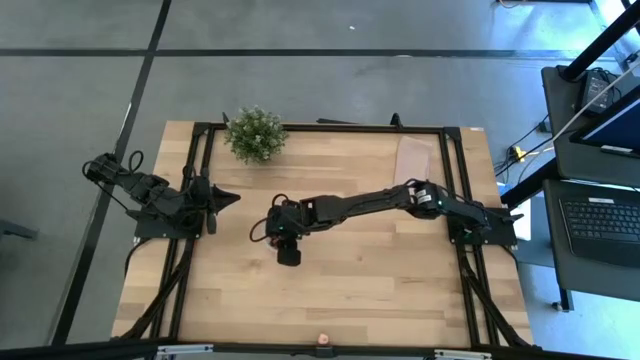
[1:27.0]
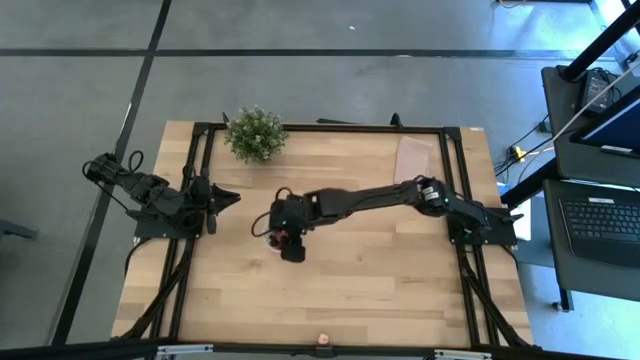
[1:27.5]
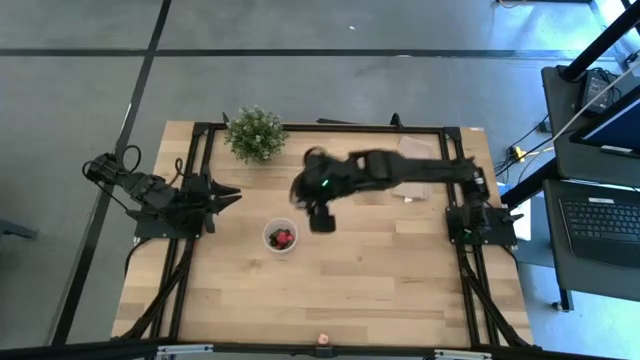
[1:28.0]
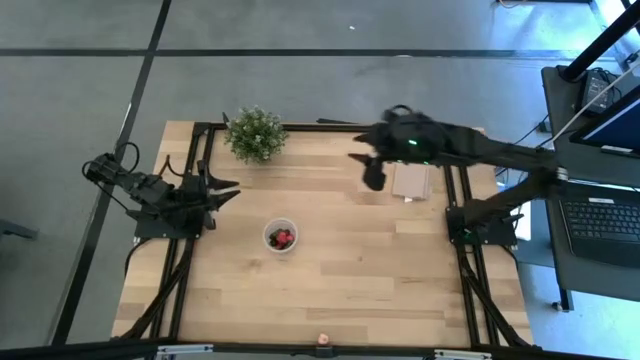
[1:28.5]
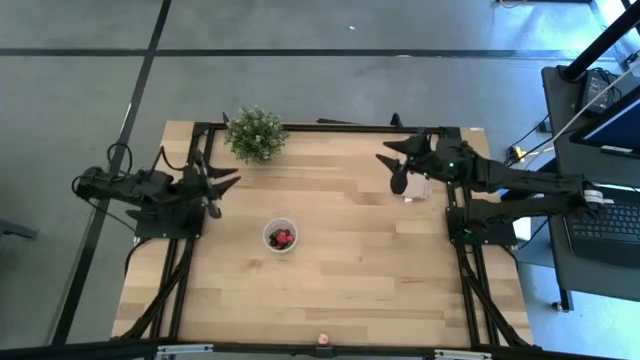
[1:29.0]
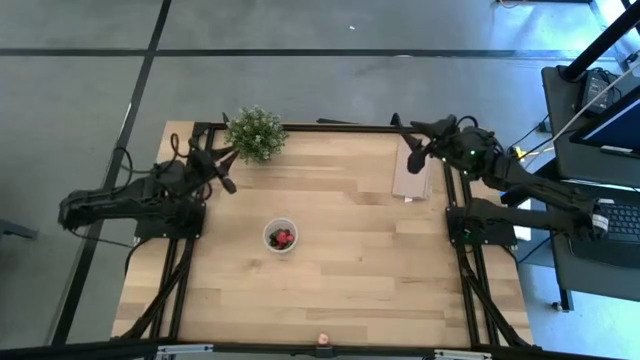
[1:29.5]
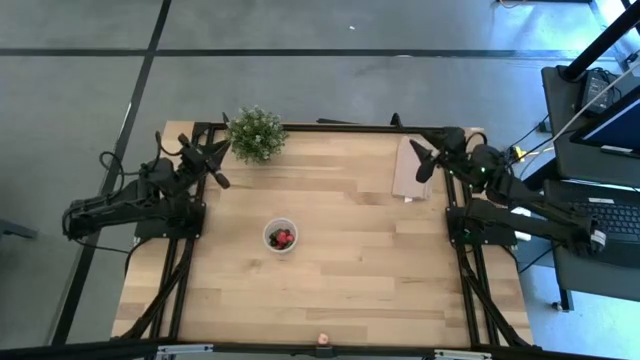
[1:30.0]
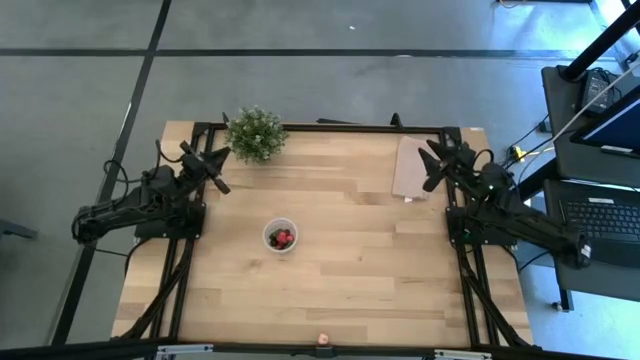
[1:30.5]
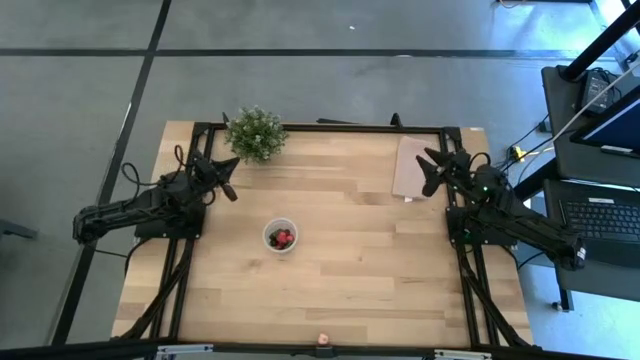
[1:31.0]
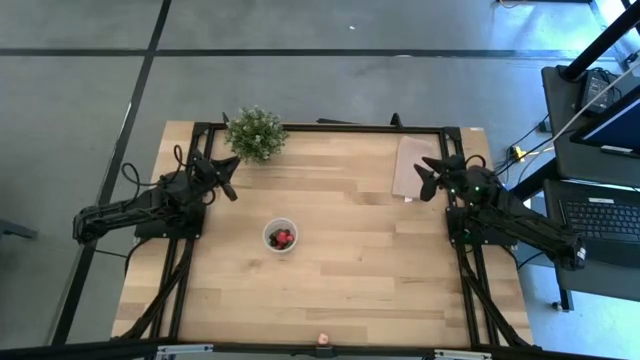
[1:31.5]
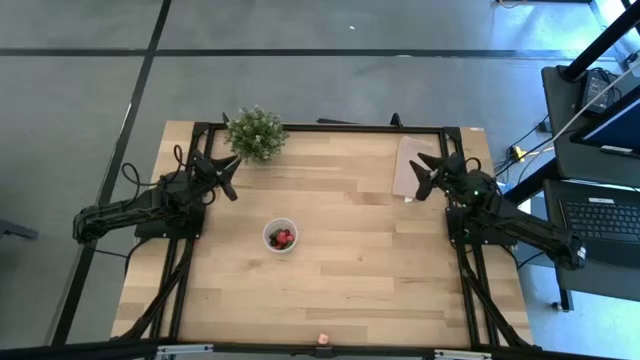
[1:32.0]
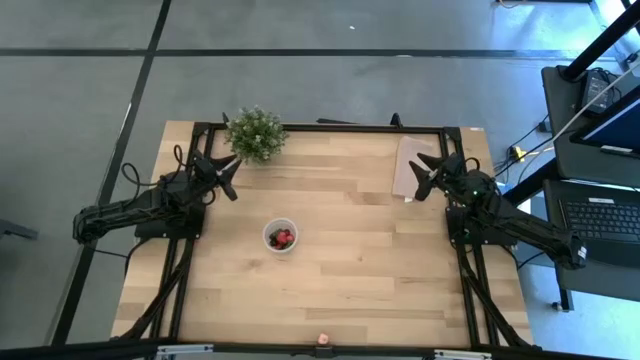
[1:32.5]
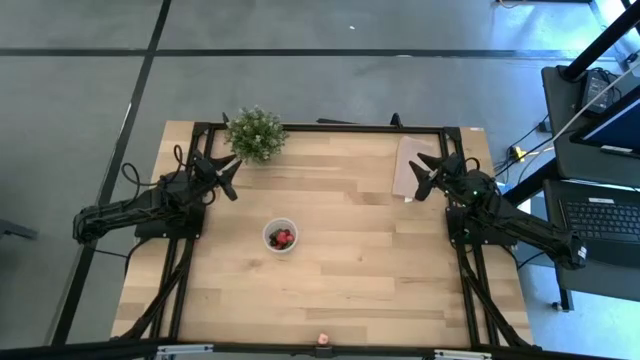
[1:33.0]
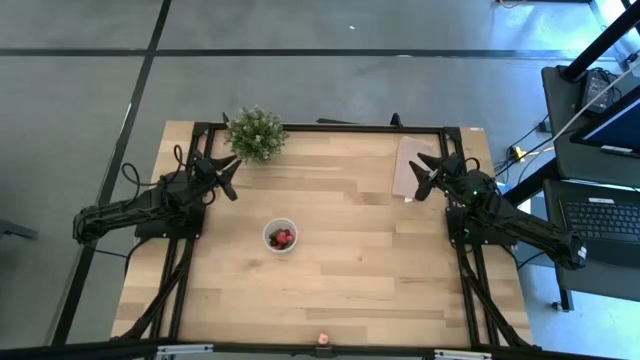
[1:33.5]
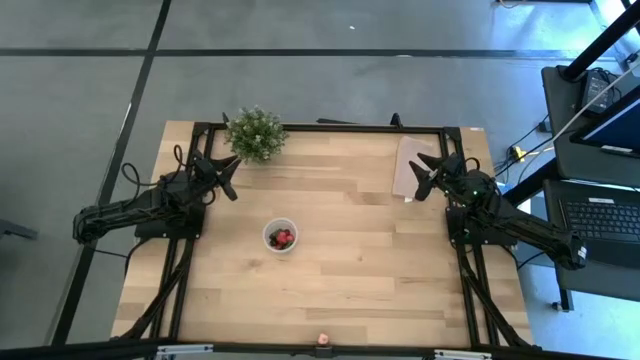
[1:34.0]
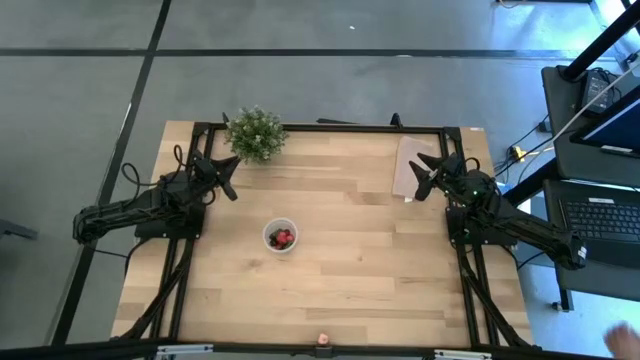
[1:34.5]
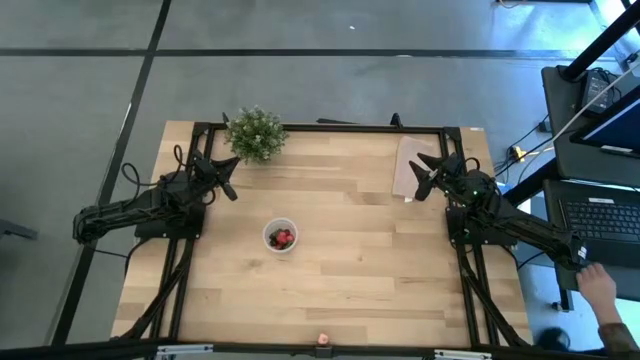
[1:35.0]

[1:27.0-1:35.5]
Task: Pick and placing Produce into tupperware
Return to Home Position

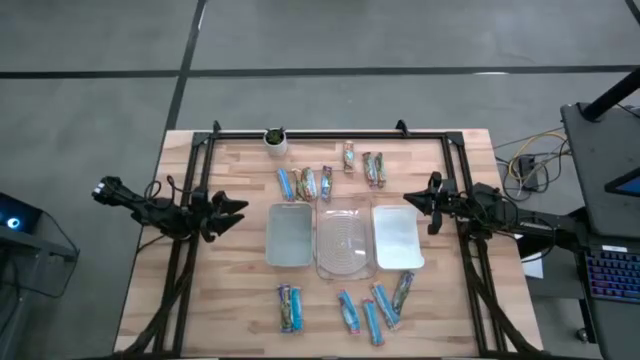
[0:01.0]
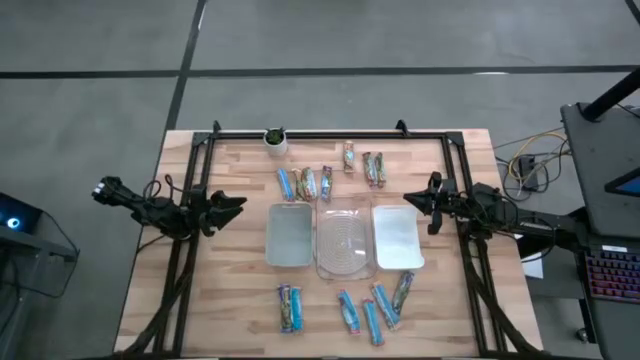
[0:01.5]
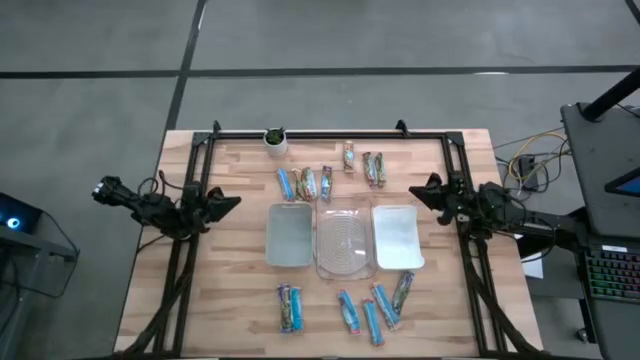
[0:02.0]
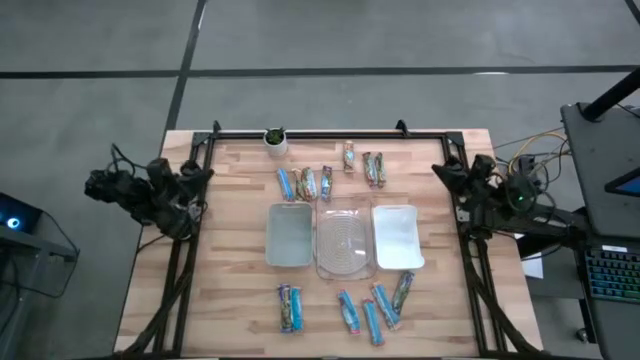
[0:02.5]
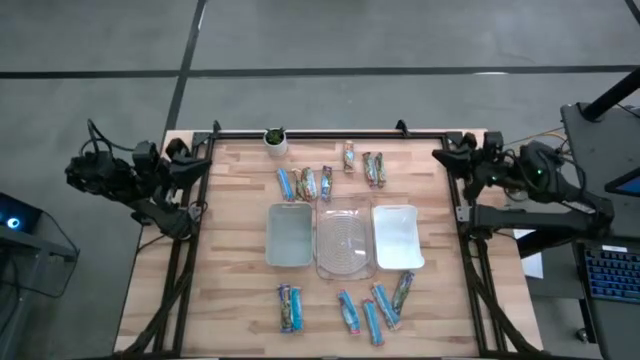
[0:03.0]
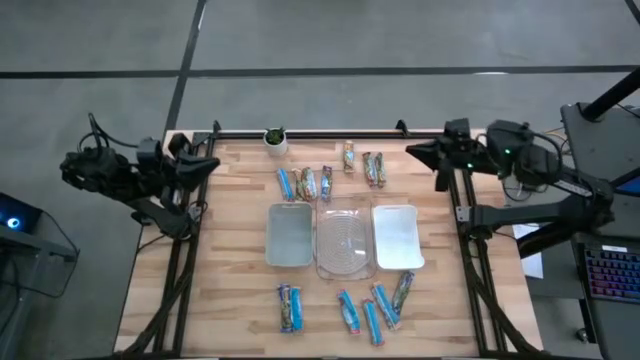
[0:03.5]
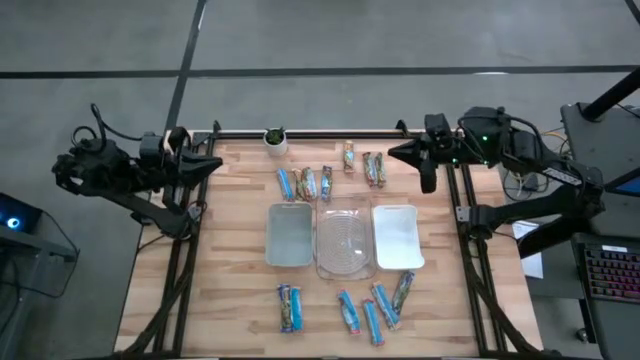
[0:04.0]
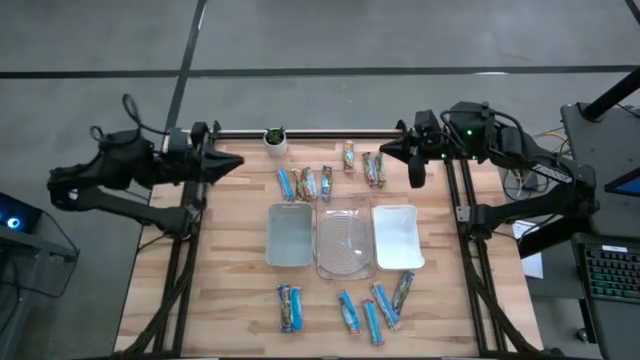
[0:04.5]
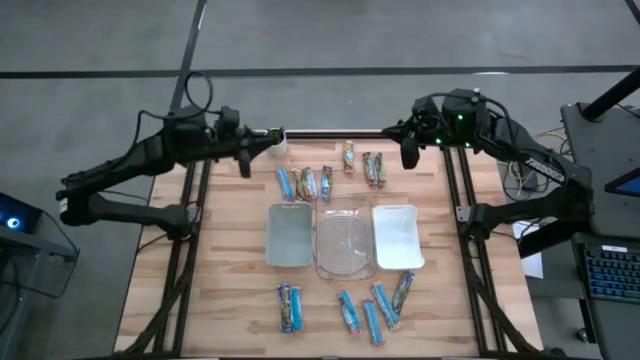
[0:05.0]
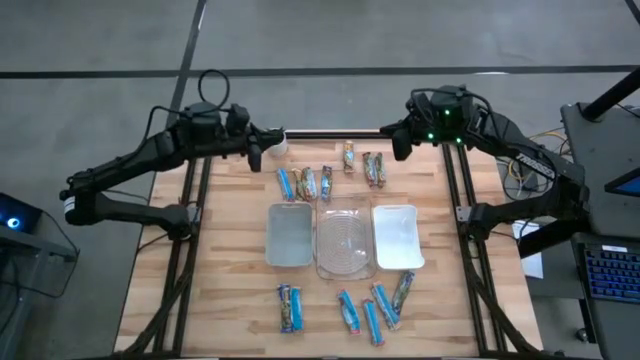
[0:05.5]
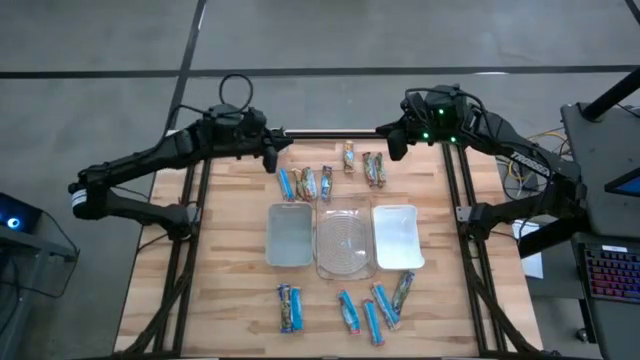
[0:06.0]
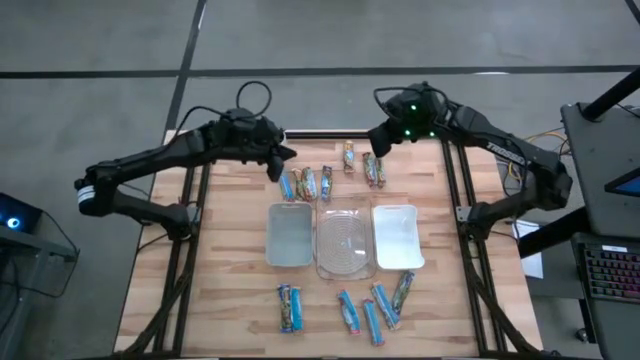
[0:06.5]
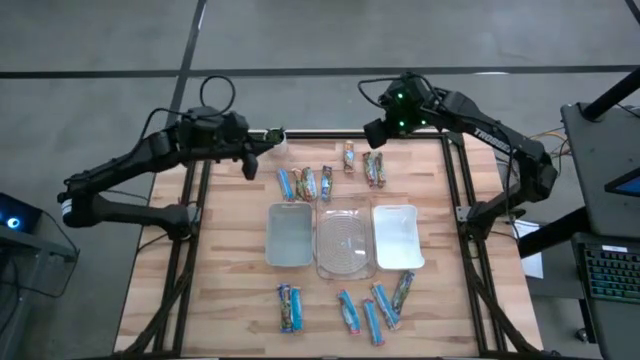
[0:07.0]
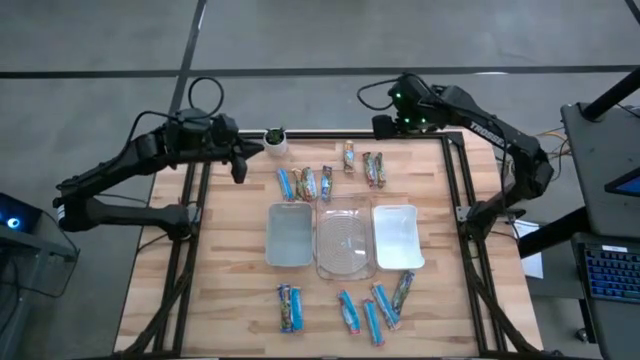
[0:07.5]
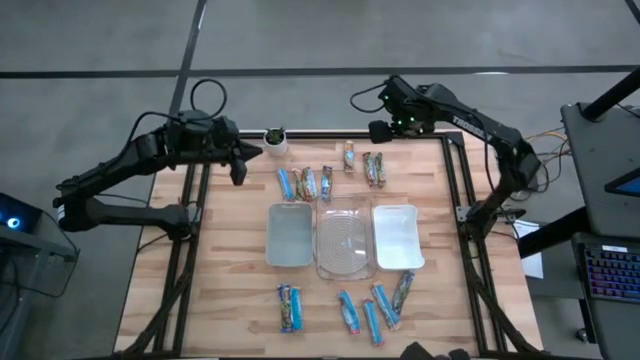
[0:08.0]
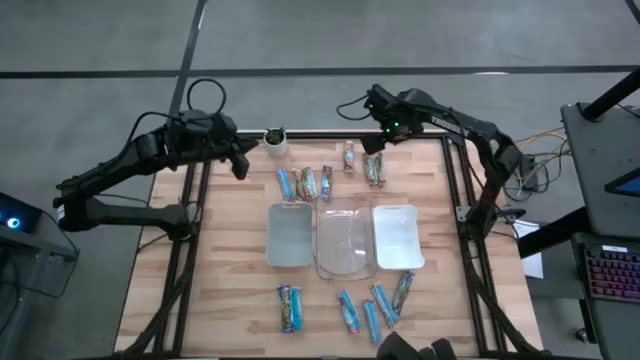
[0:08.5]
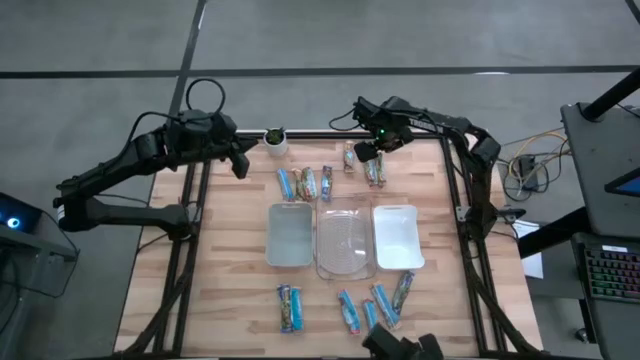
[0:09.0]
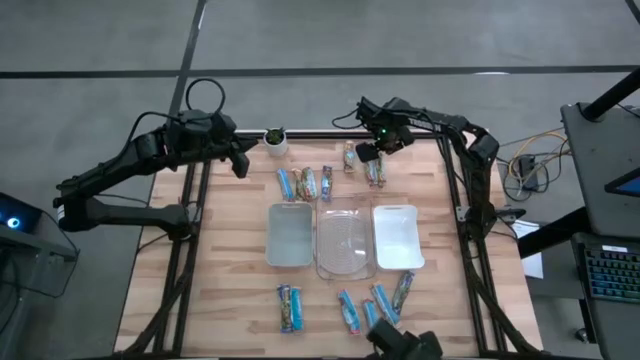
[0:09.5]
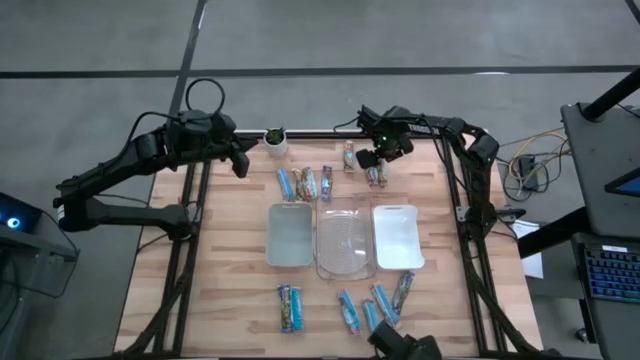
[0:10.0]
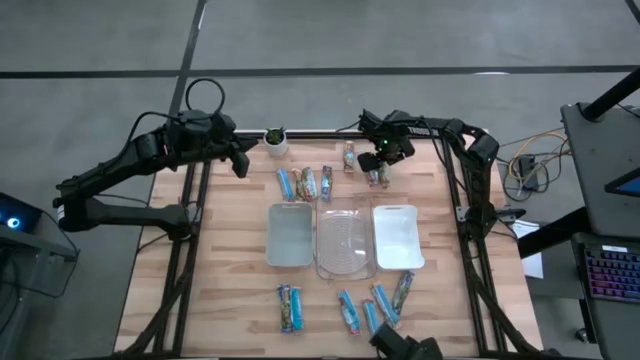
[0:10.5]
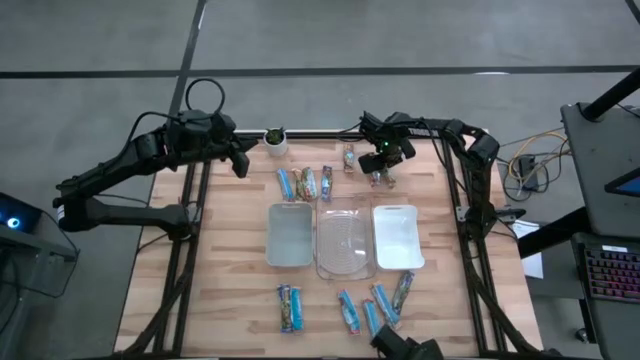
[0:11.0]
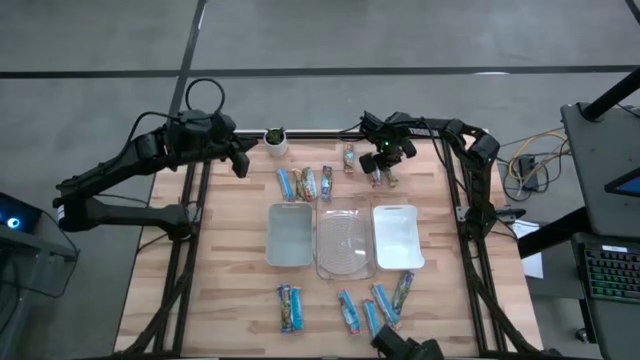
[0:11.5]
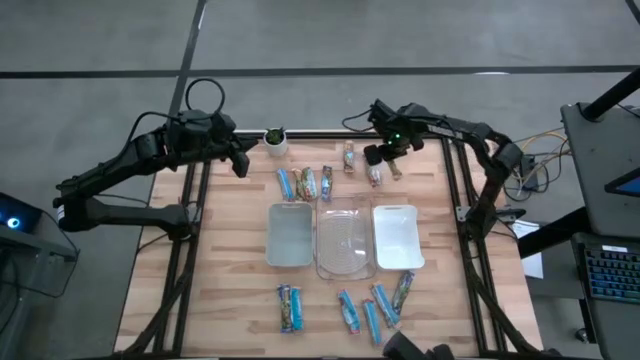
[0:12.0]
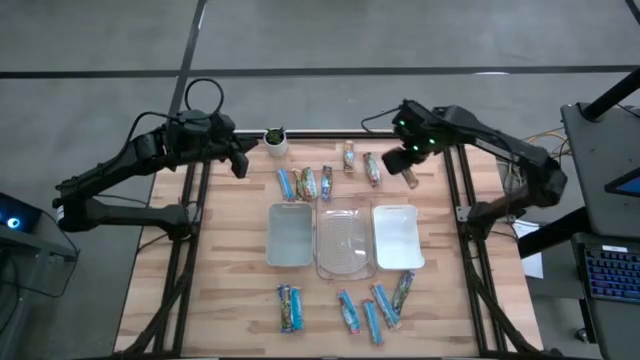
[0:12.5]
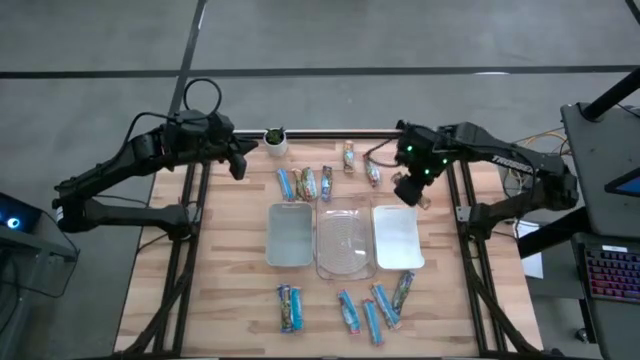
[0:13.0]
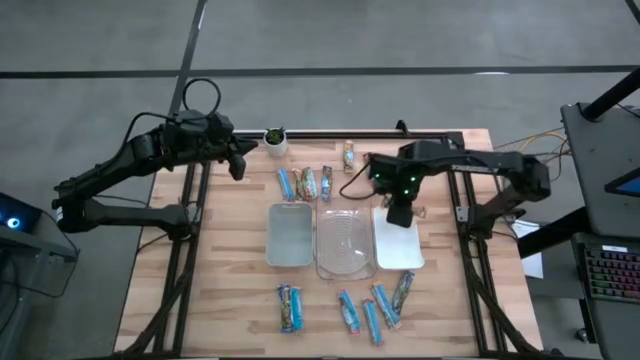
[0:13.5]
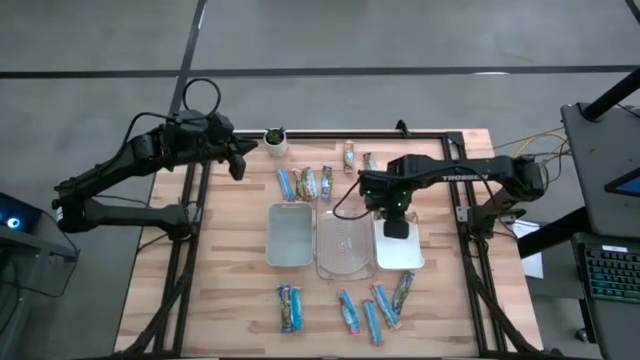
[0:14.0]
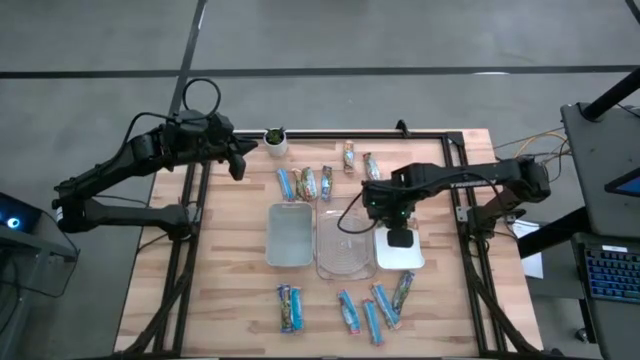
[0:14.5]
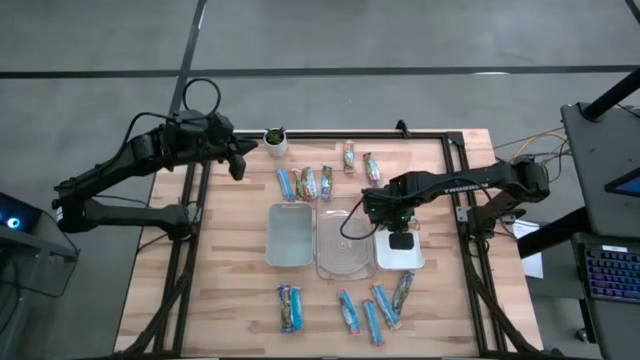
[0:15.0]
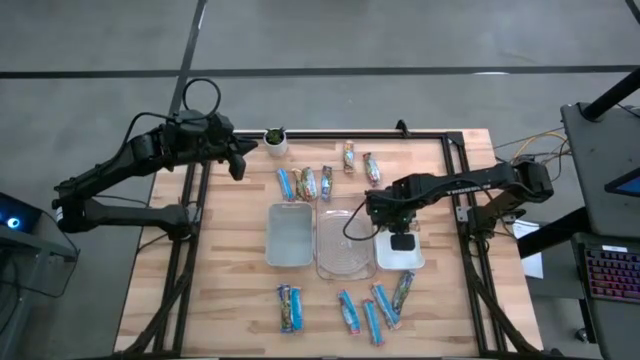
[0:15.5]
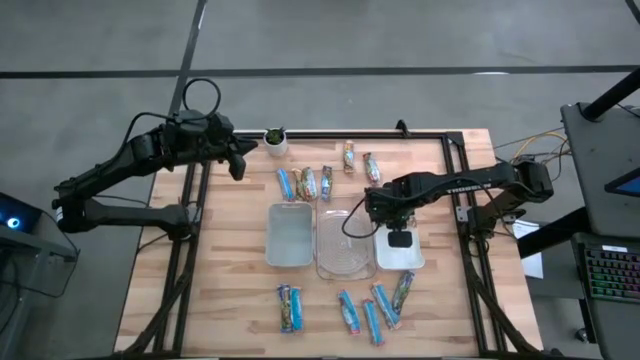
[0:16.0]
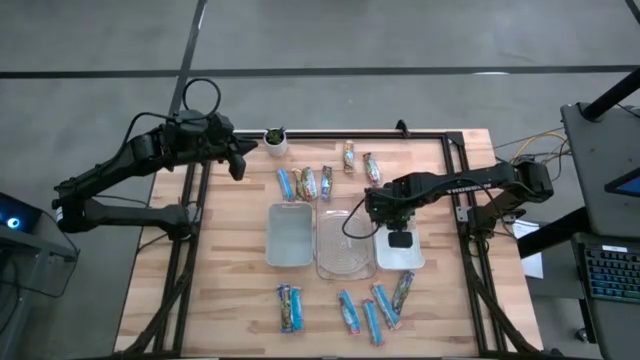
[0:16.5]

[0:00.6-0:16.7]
Task: Pick and place Granola Bars by type
Put the yellow granola bar into the white bin
